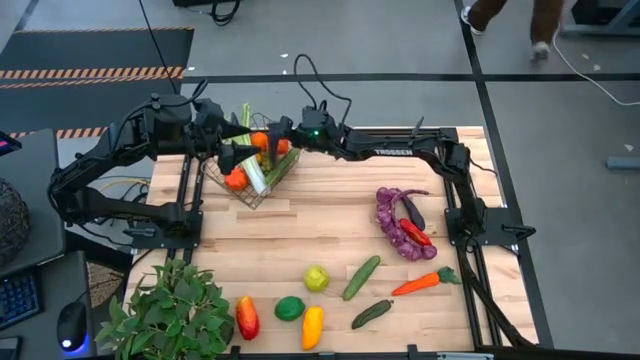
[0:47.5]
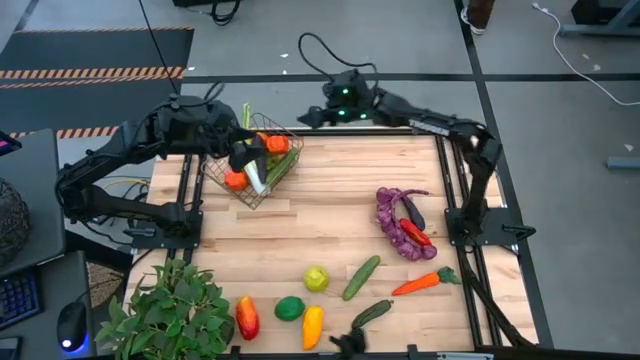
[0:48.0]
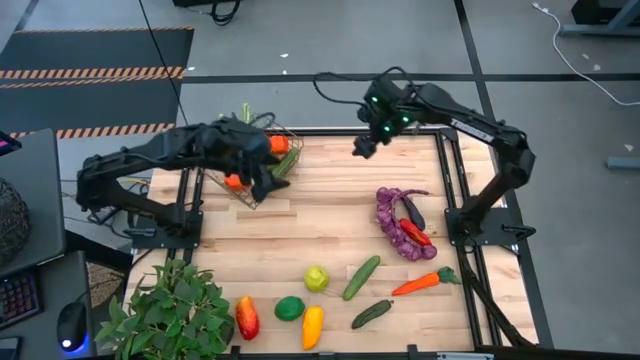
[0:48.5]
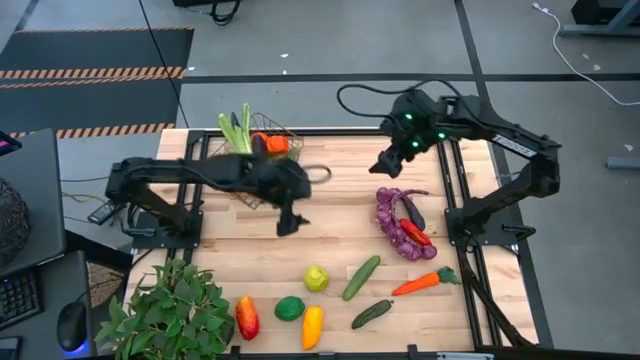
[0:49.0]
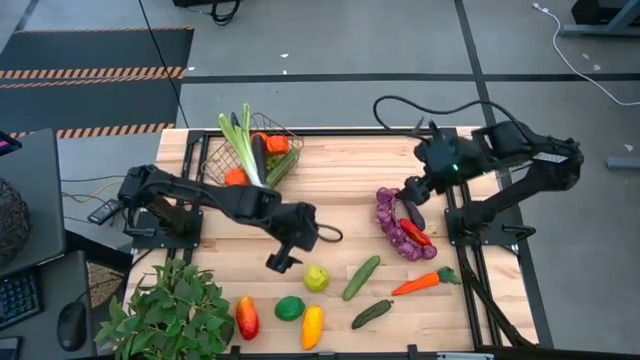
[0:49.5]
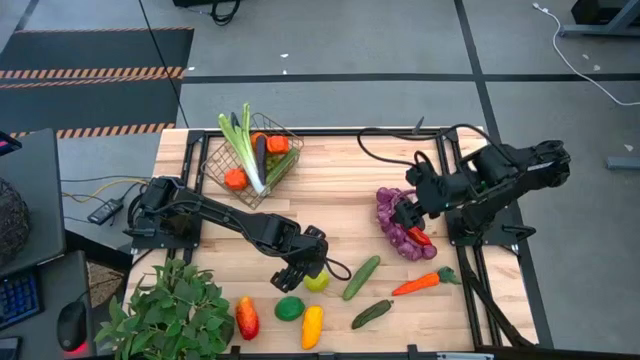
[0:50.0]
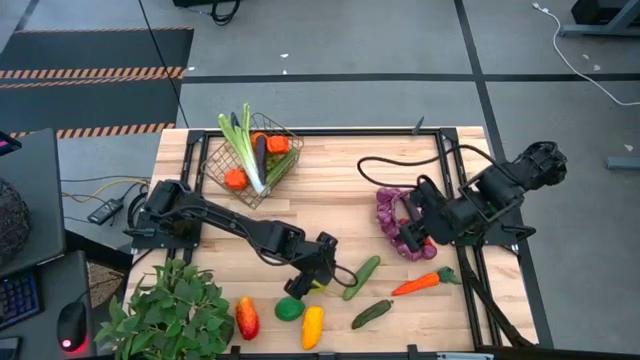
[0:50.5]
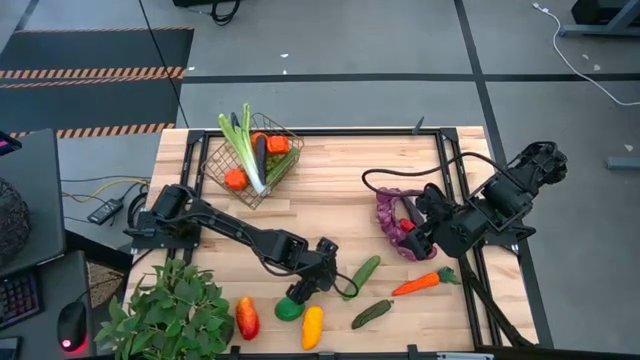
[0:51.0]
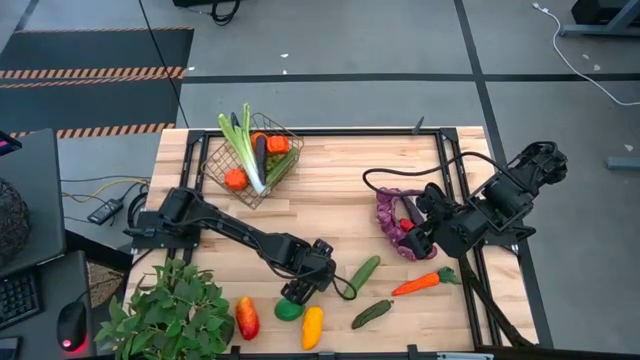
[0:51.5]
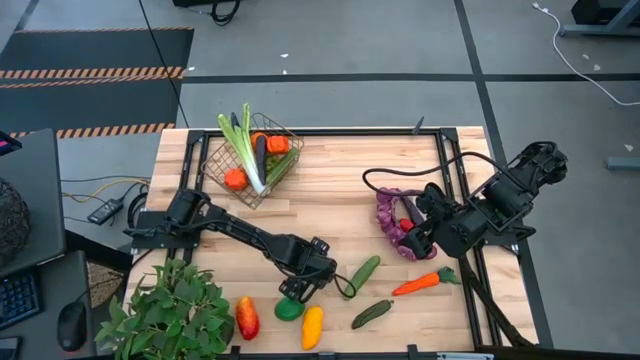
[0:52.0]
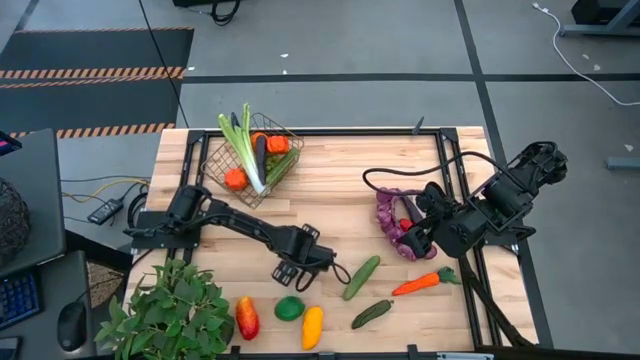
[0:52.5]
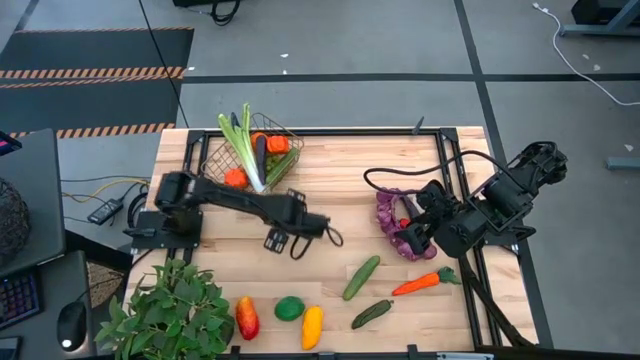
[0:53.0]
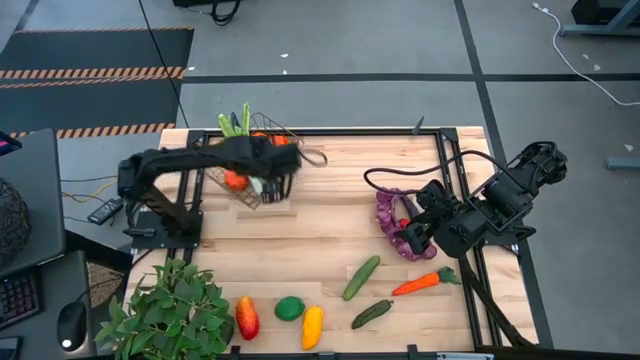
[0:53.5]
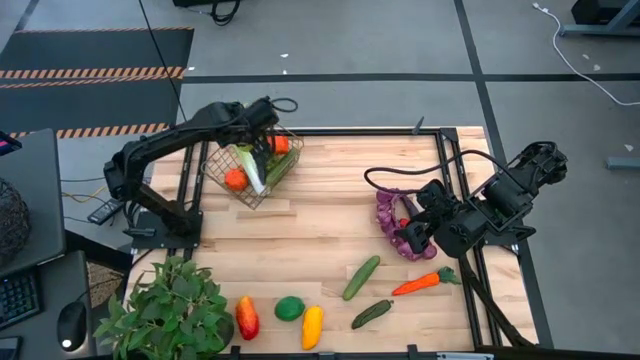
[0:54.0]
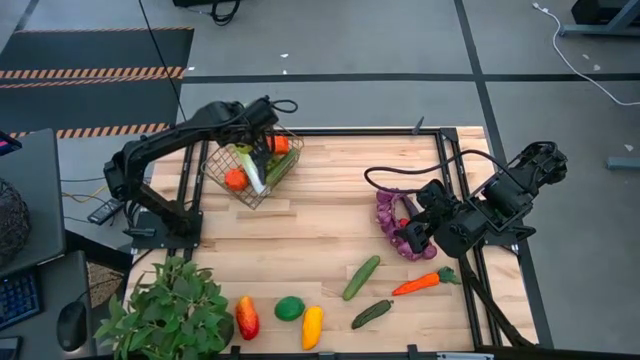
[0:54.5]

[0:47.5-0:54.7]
Task: Build produce basket
Put the apple into the wire basket

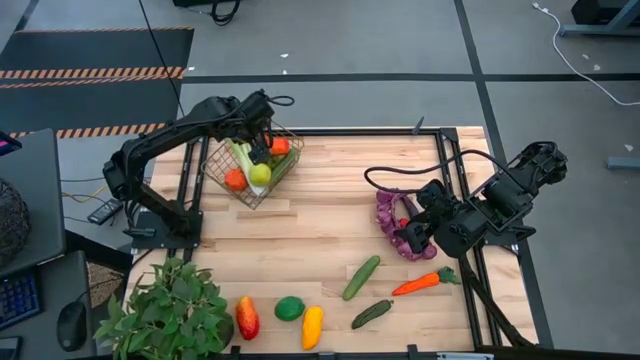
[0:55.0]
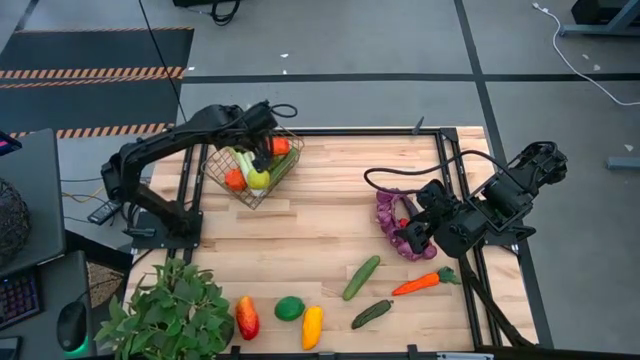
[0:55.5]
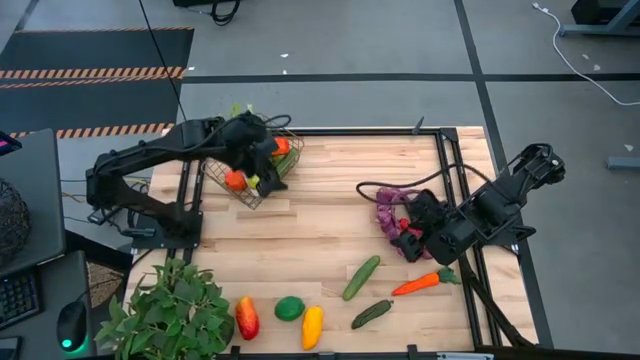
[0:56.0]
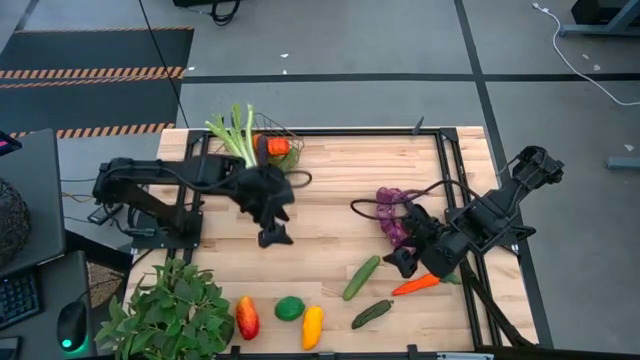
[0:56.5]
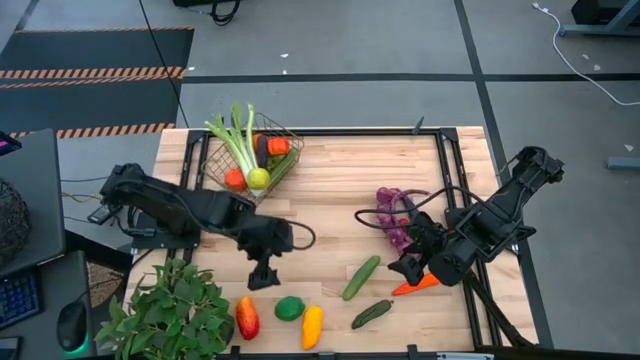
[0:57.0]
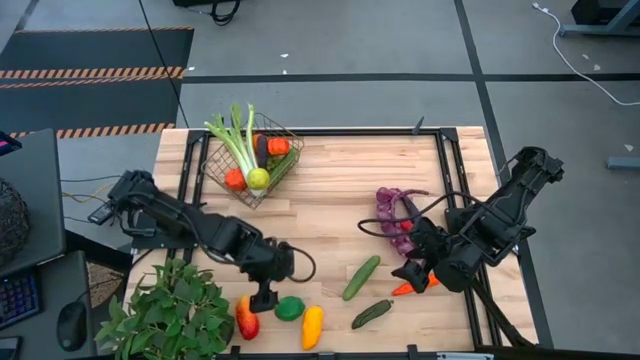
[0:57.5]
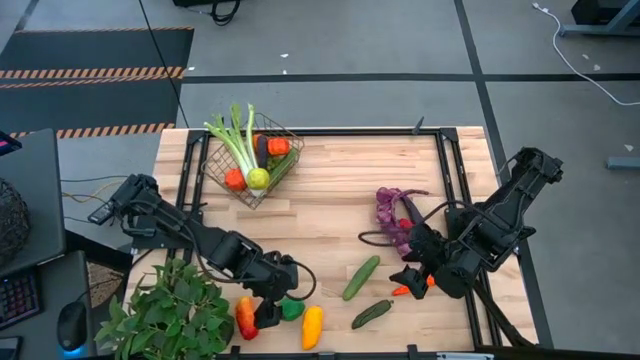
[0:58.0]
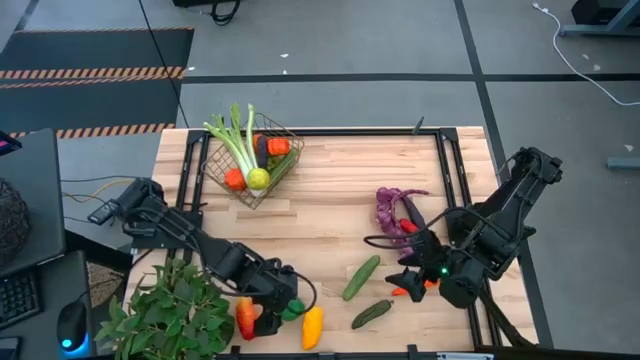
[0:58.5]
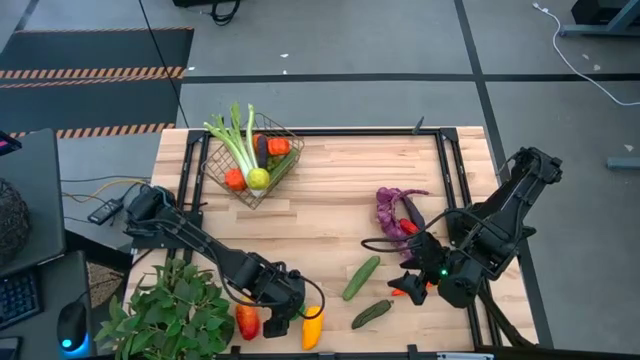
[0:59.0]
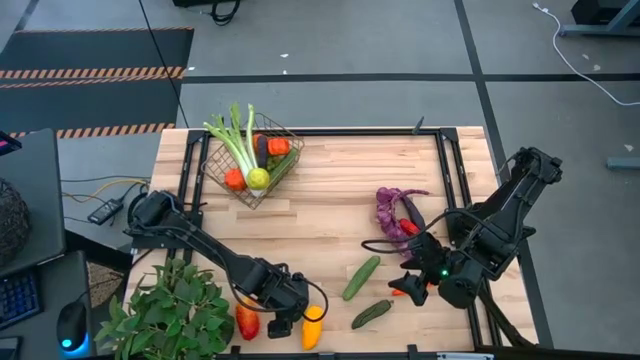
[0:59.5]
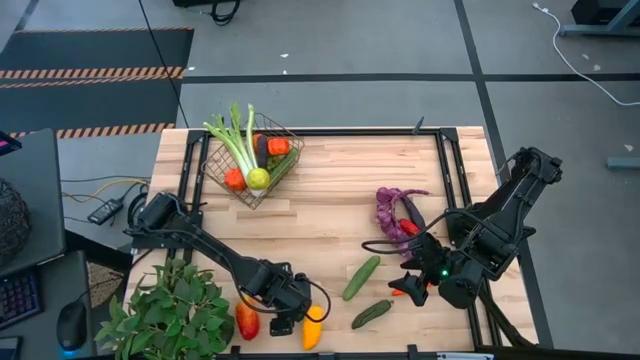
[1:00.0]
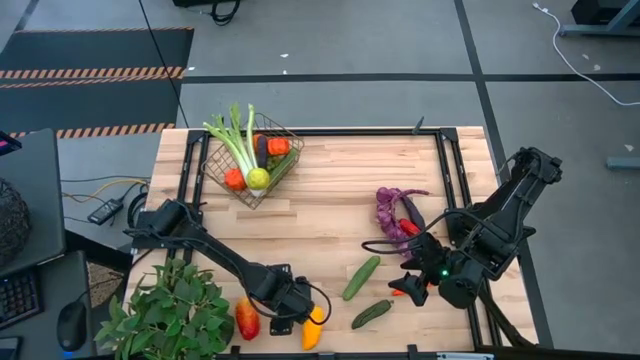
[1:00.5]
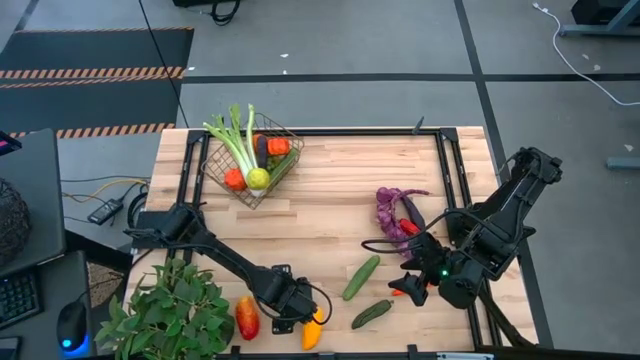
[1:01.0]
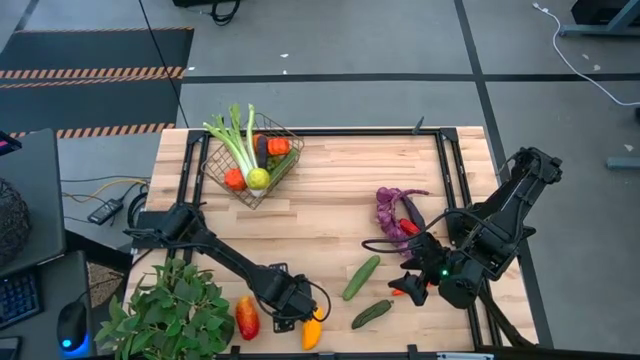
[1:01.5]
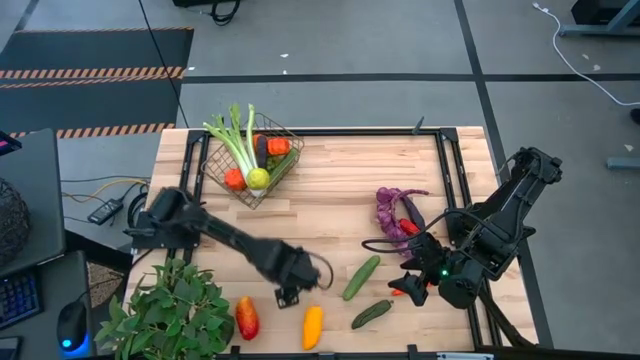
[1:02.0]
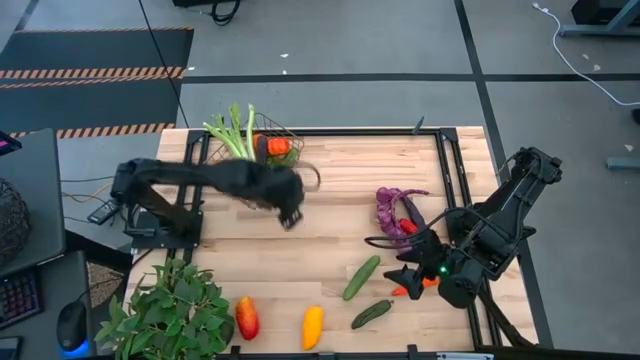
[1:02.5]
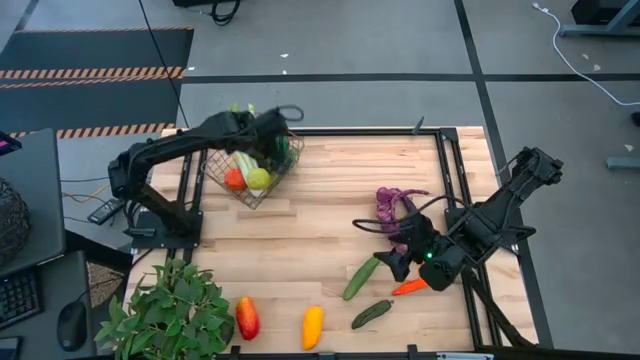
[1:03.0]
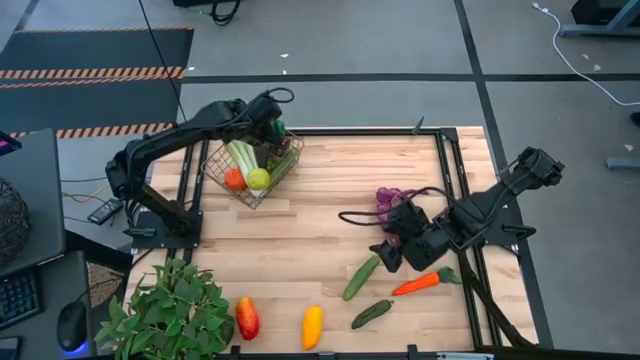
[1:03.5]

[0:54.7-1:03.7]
Put the lime into the wire basket

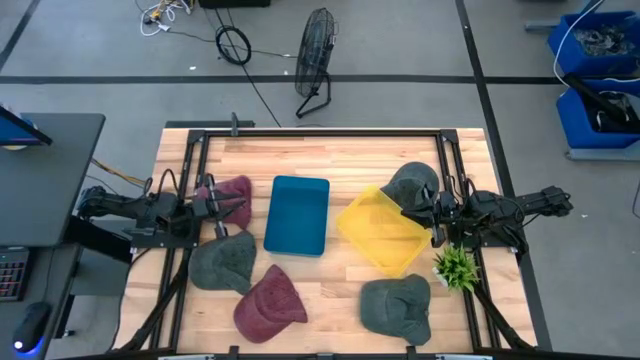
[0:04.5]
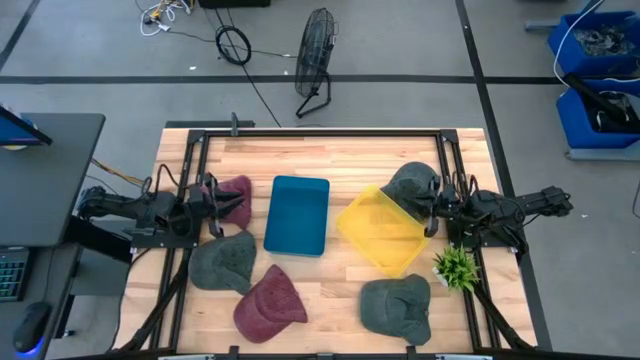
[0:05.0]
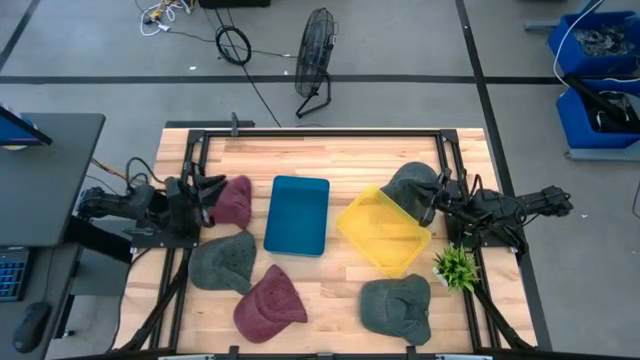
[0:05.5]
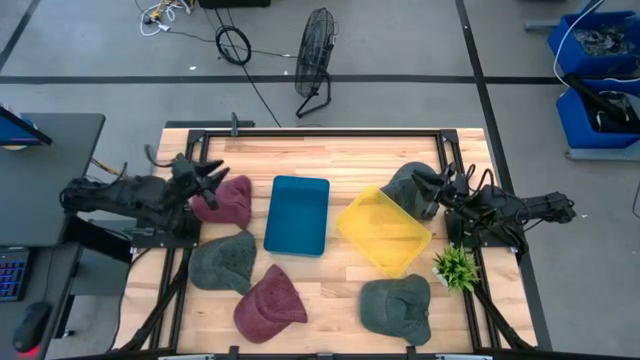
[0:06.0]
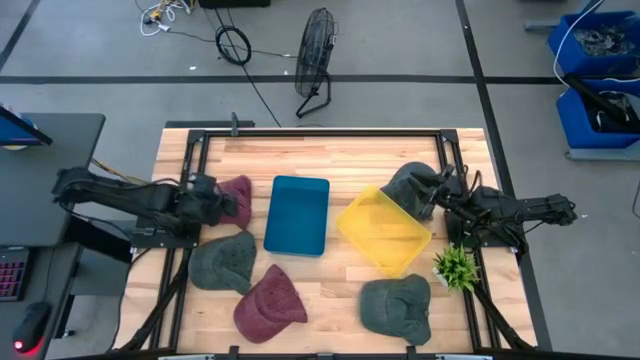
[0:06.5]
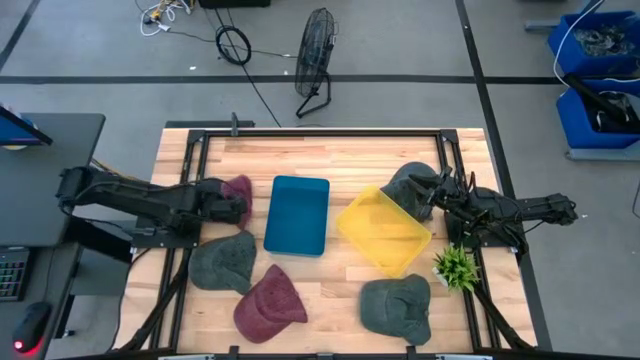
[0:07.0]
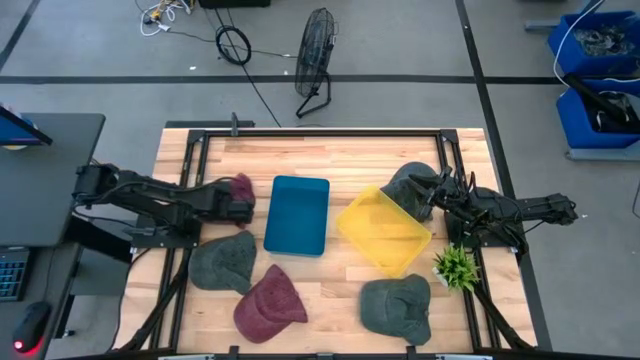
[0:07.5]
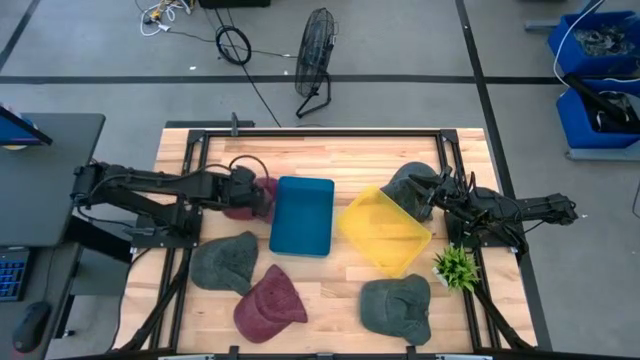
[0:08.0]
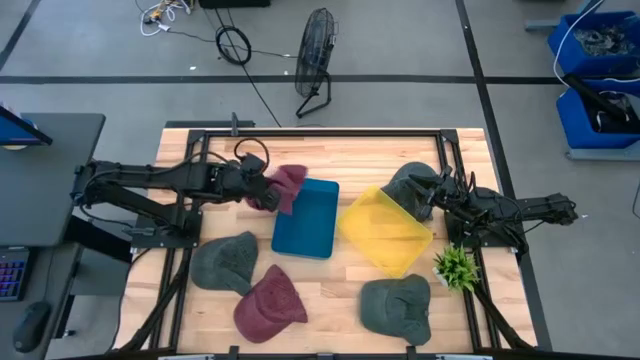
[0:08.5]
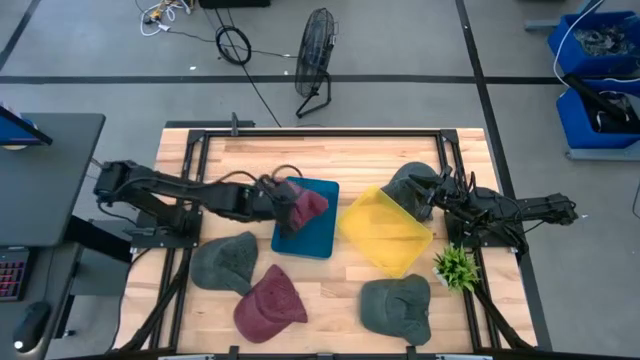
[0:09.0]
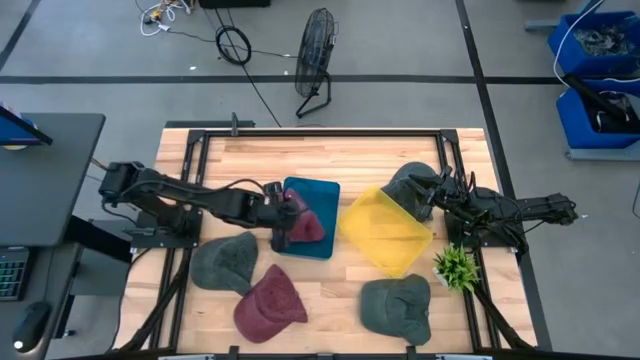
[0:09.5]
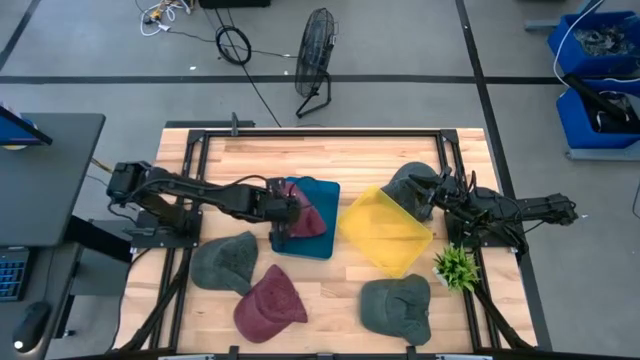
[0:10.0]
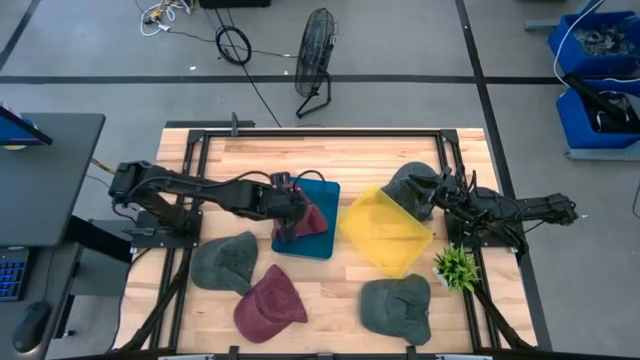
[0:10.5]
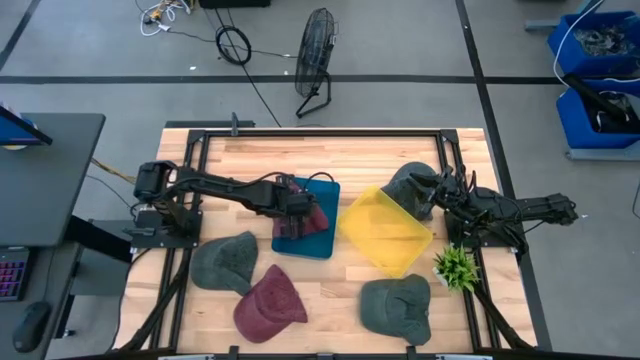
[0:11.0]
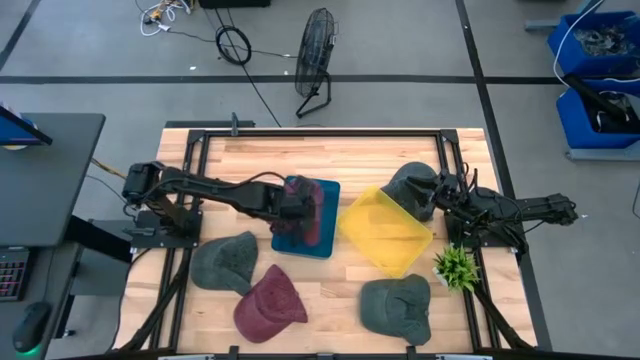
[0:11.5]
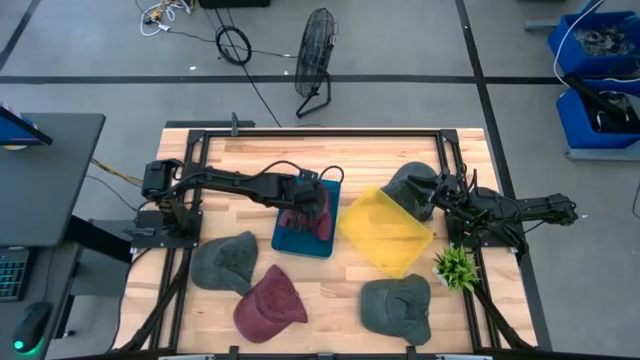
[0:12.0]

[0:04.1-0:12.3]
Task: Pick & Place hat
Put the top red cap into the blue bin
